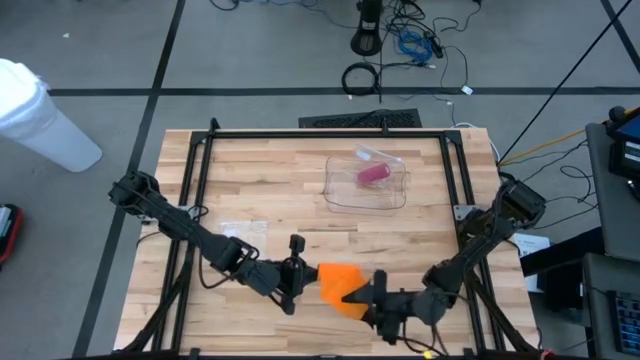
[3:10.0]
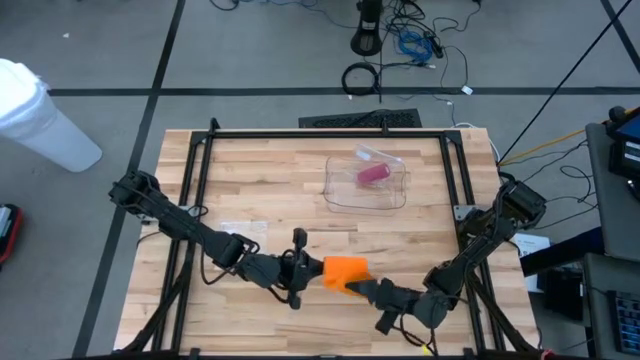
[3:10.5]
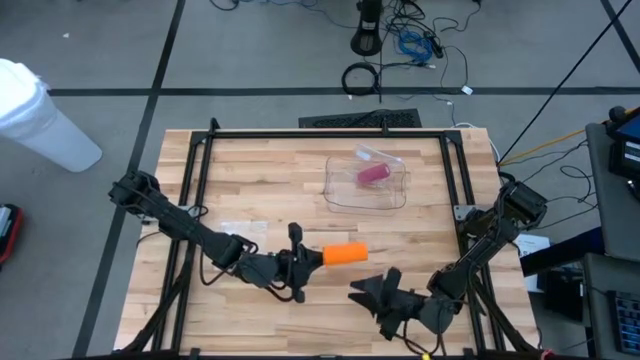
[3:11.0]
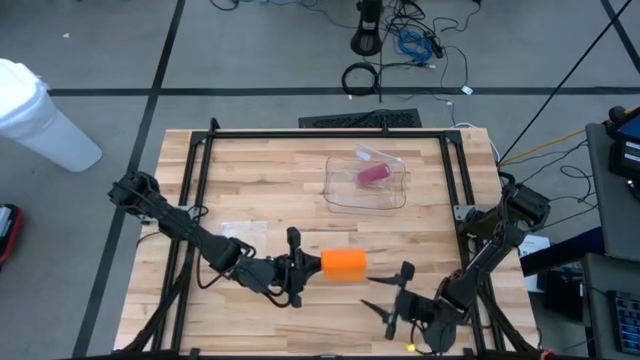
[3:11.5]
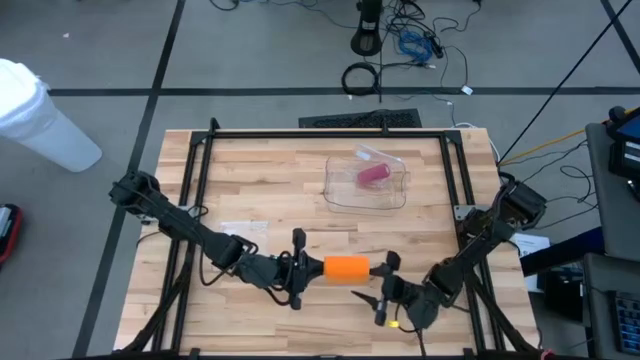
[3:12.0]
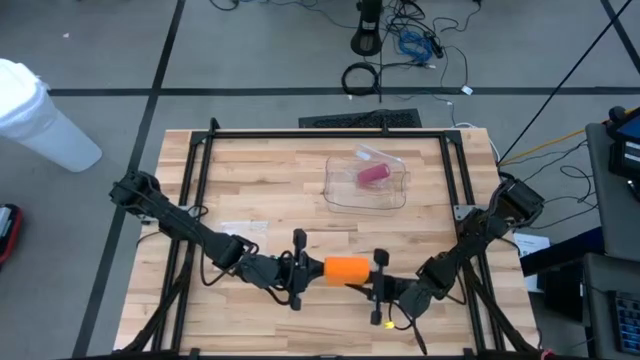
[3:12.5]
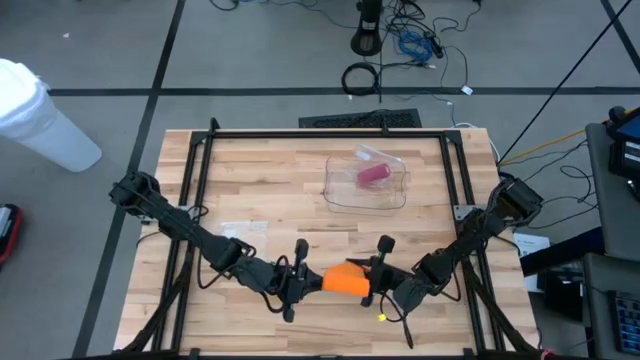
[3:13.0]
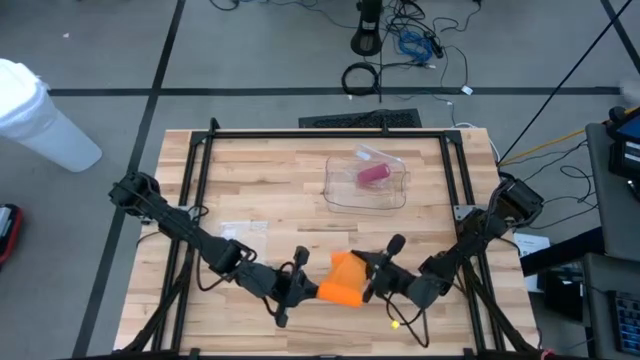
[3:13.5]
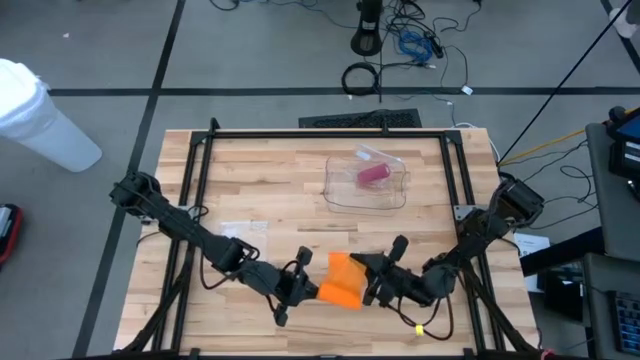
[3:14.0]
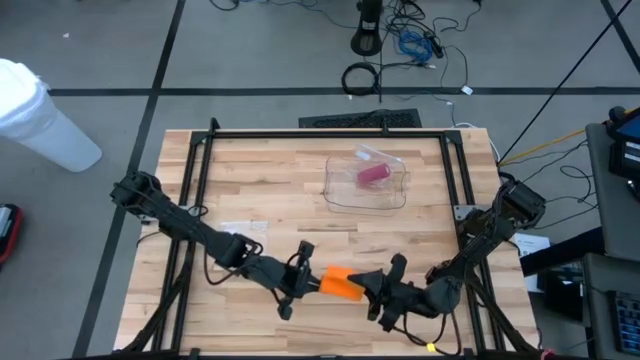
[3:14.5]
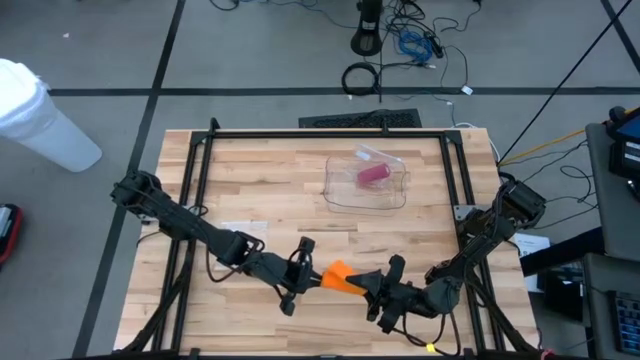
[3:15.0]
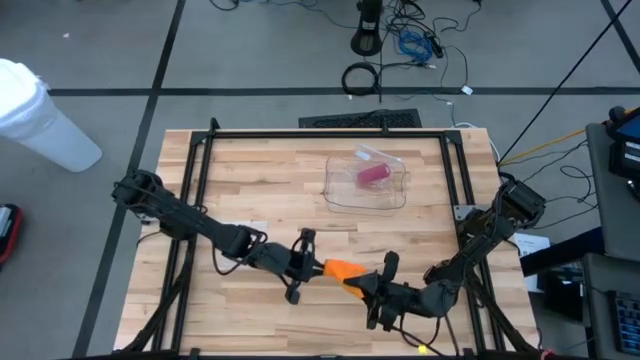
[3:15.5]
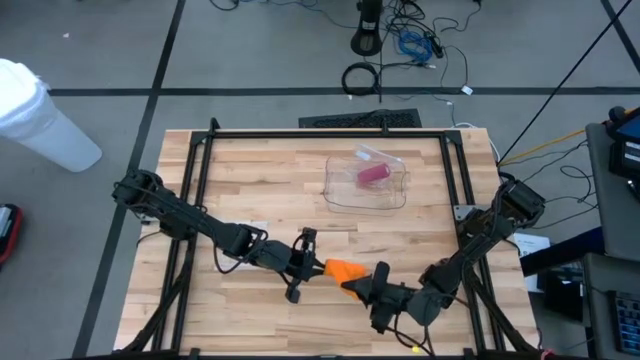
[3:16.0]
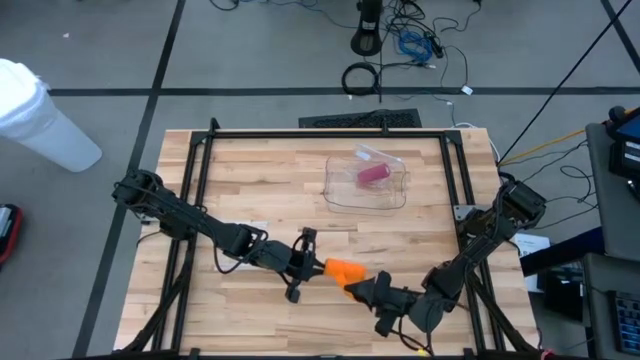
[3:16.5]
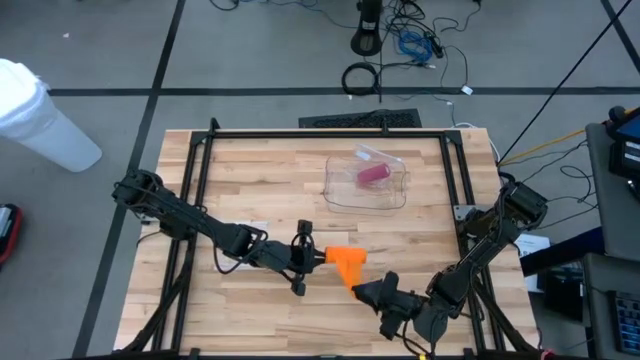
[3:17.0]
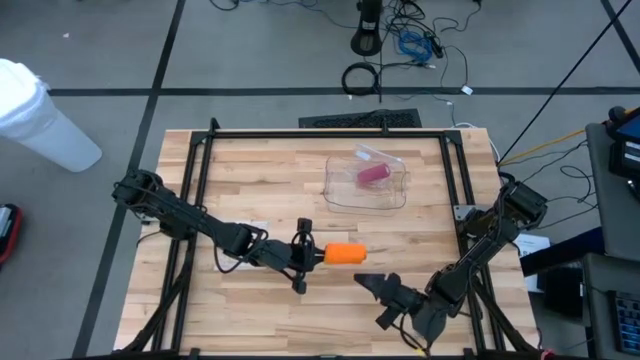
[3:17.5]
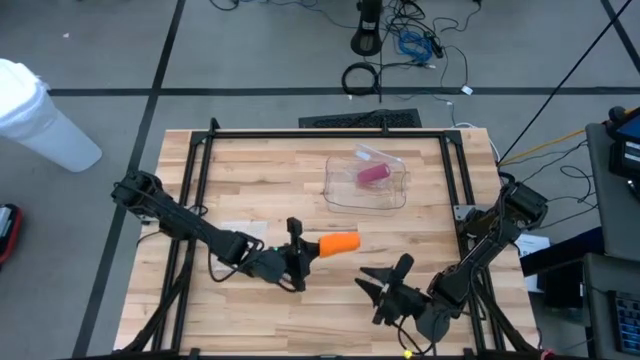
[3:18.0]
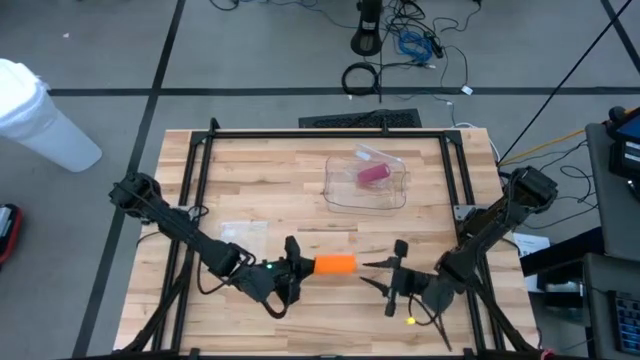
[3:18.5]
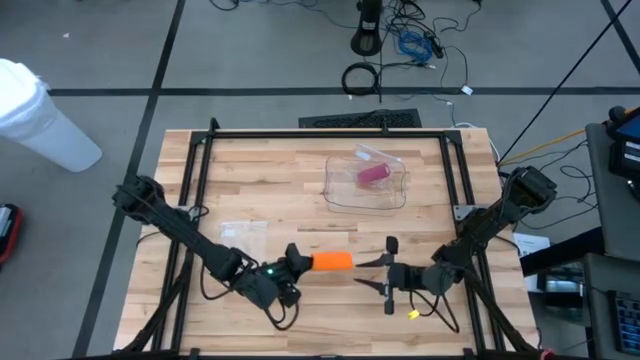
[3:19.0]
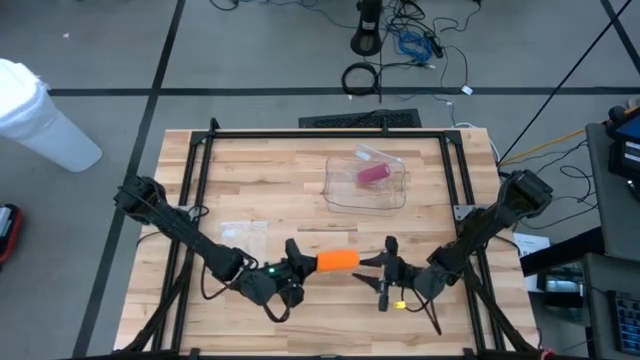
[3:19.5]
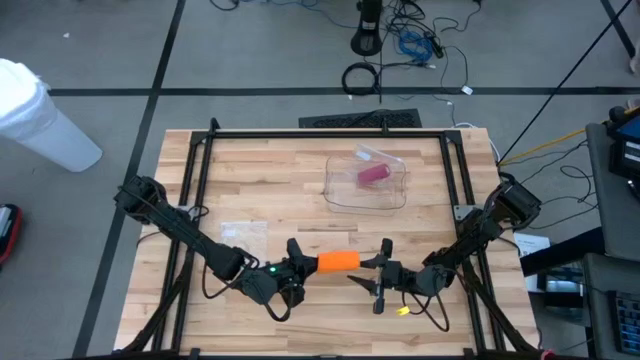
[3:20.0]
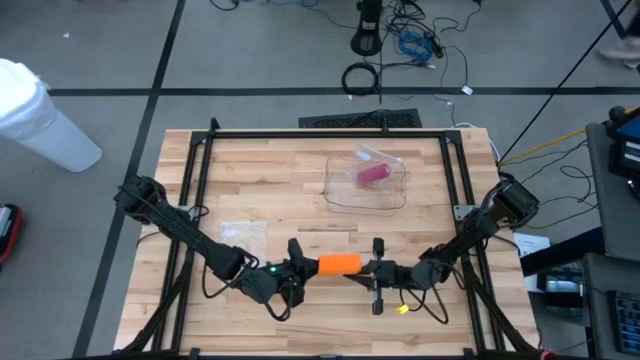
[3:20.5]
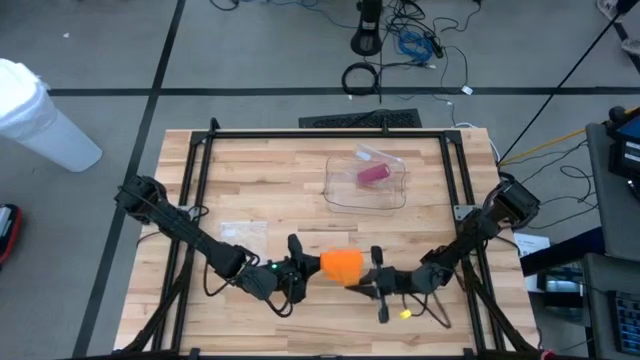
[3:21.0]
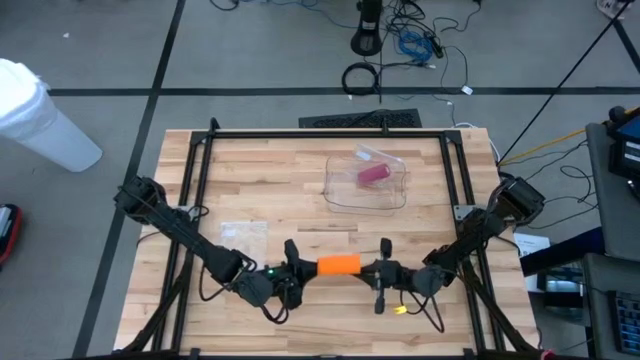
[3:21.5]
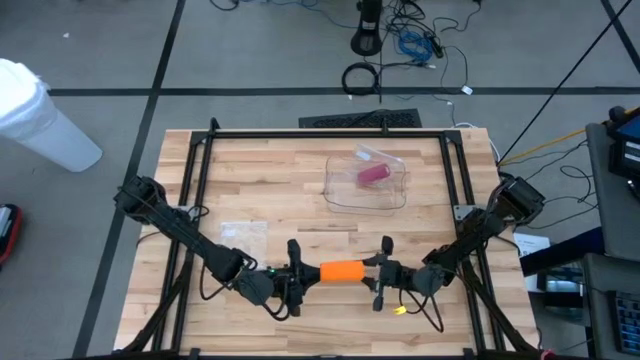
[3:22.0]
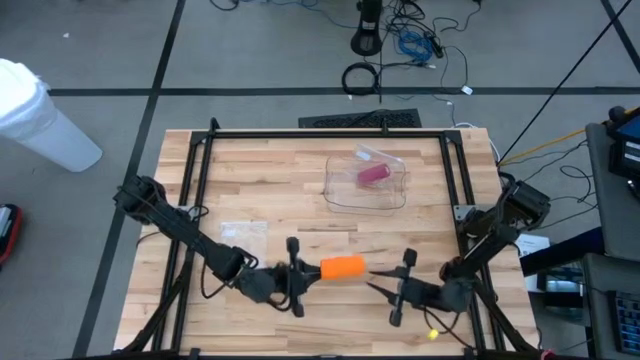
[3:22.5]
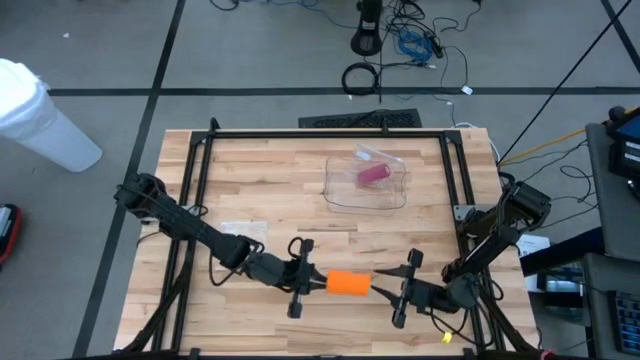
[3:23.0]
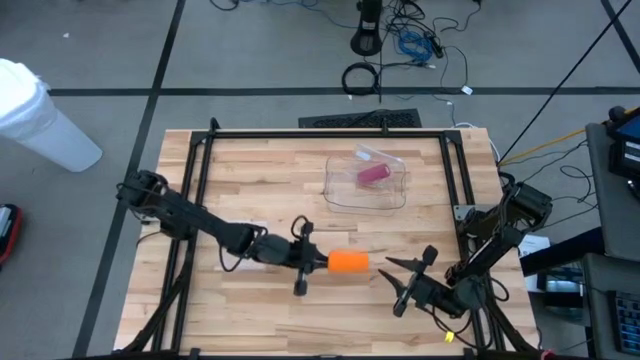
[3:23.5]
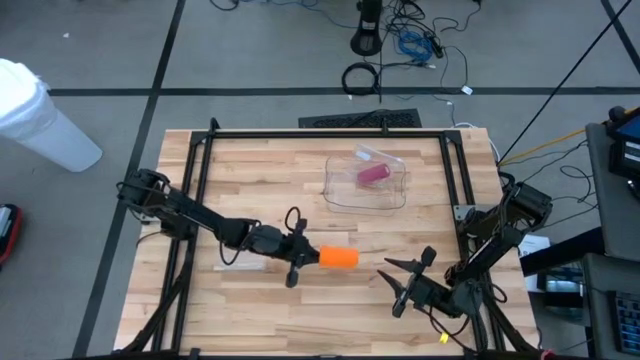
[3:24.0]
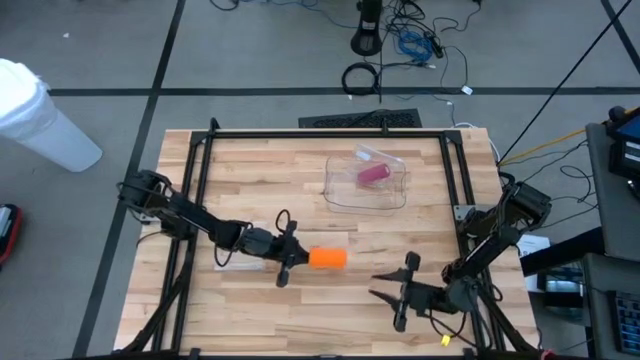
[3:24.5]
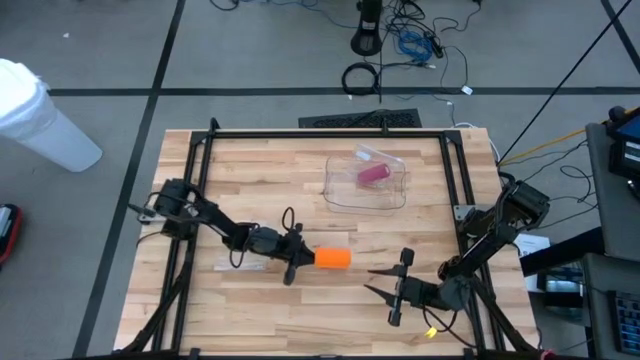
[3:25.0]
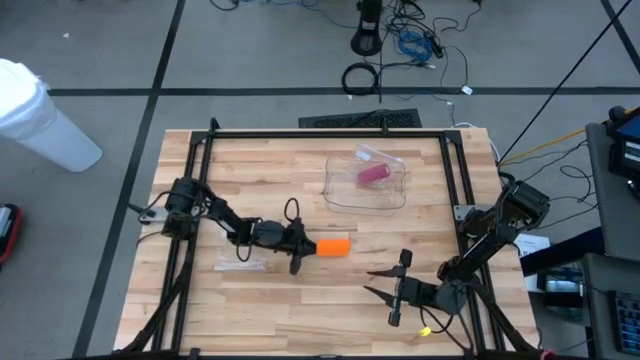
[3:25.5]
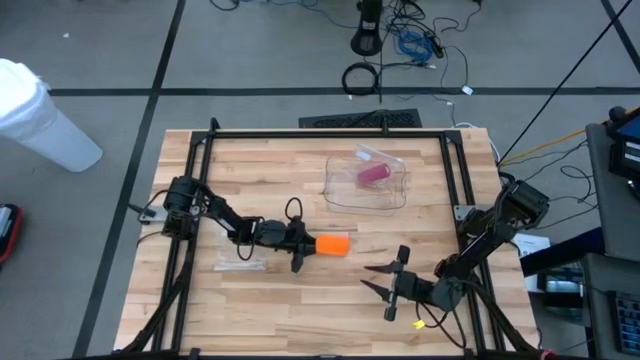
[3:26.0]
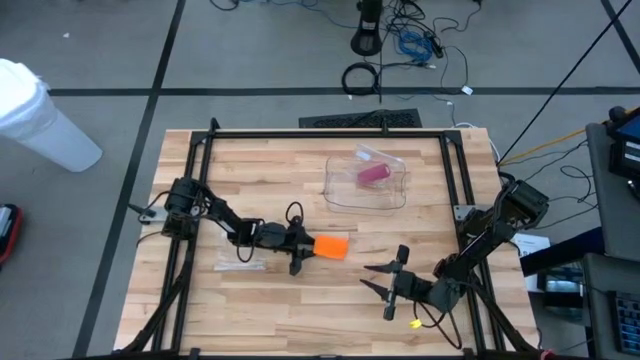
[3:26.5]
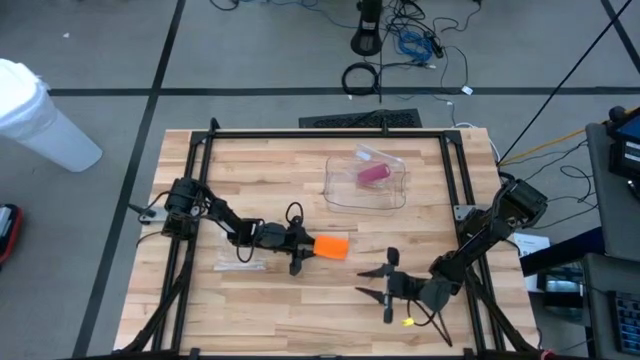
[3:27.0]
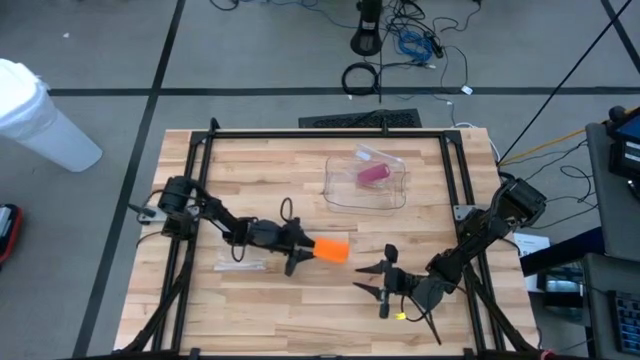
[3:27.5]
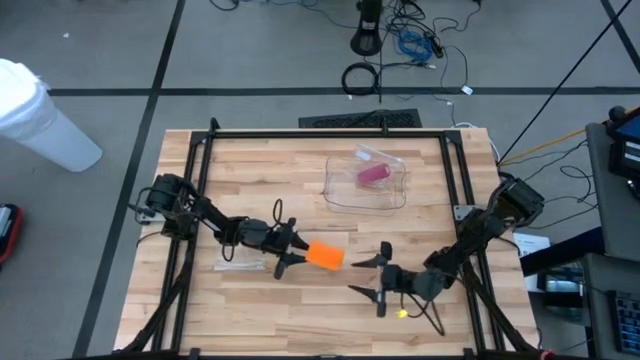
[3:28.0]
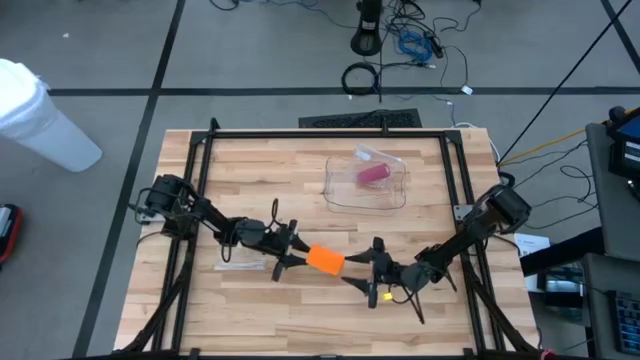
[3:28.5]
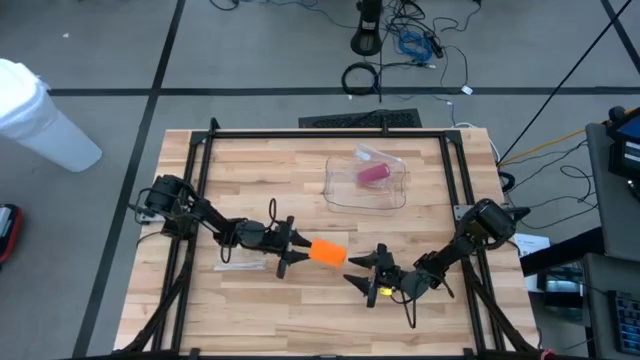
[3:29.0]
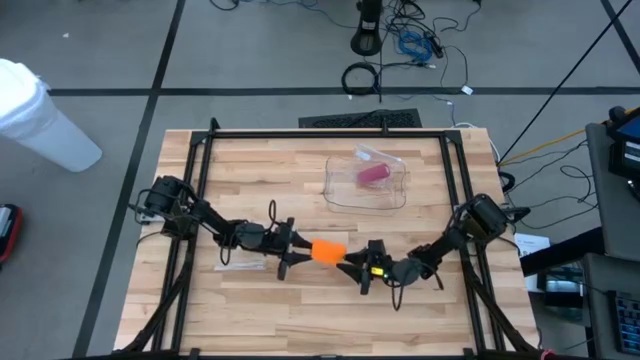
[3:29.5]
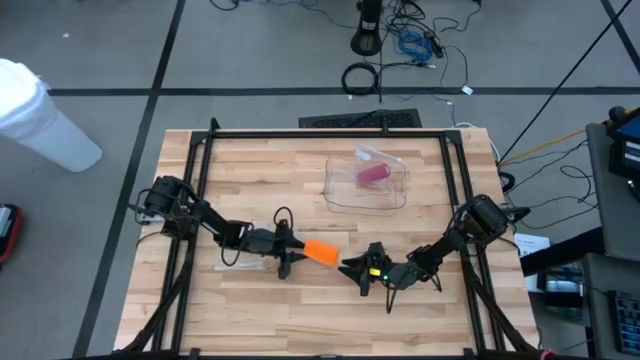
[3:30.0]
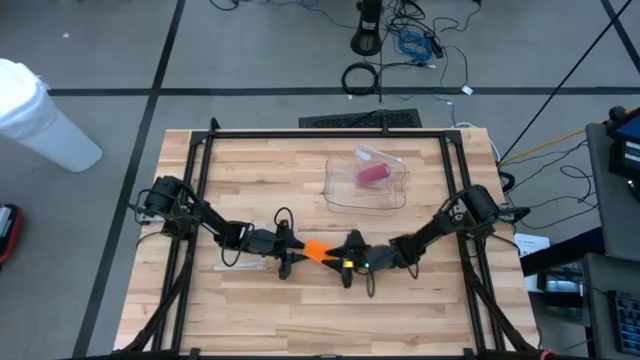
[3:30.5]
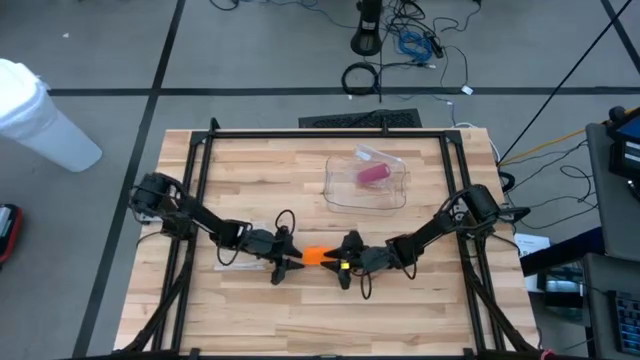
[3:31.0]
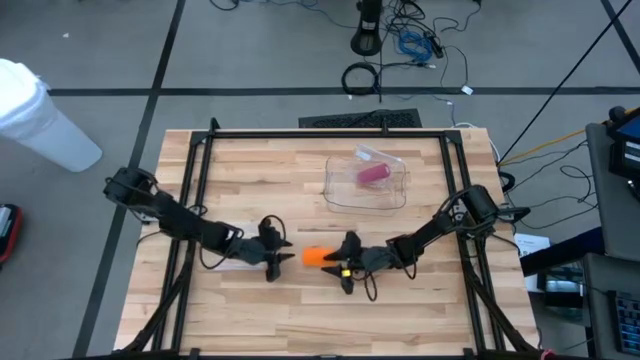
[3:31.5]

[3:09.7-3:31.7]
Task: Roll bandage
Roll the orange bandage
